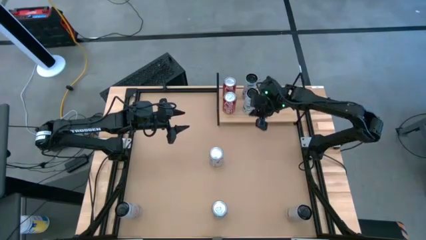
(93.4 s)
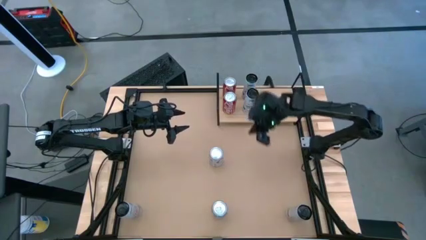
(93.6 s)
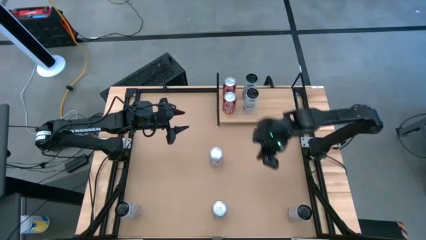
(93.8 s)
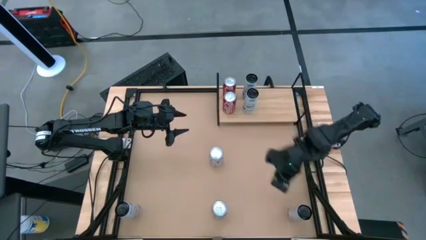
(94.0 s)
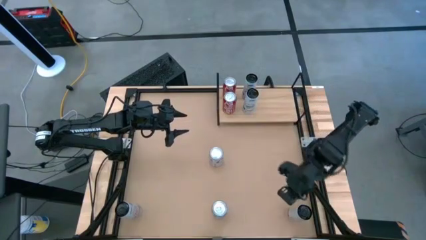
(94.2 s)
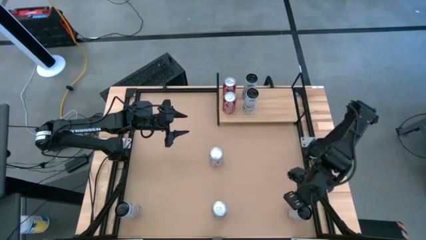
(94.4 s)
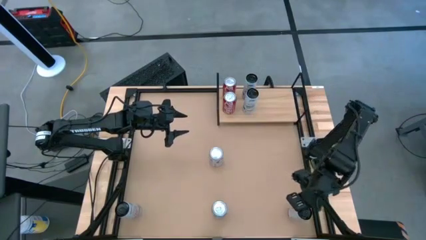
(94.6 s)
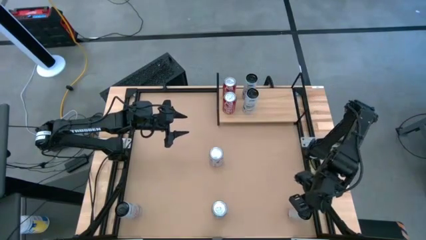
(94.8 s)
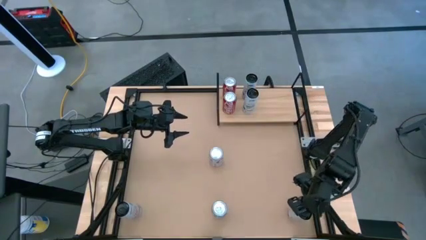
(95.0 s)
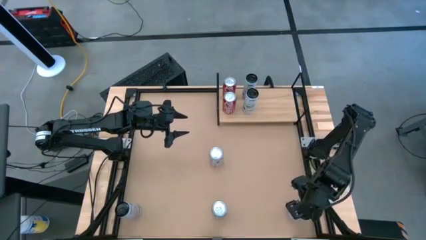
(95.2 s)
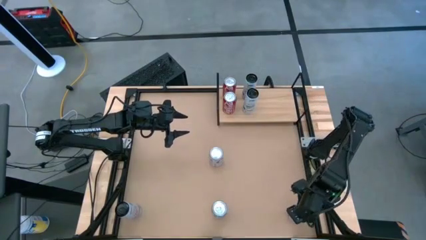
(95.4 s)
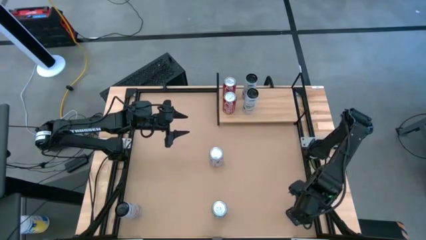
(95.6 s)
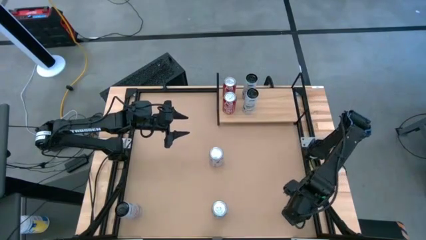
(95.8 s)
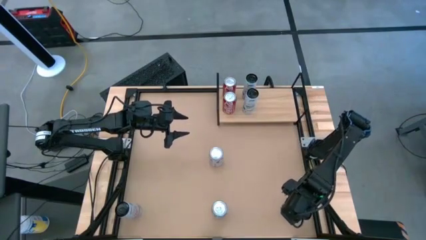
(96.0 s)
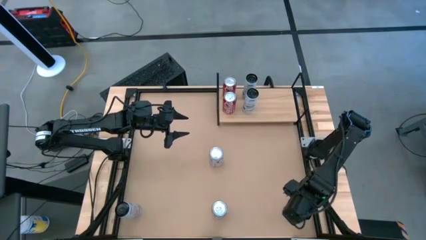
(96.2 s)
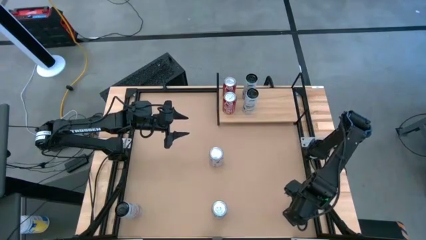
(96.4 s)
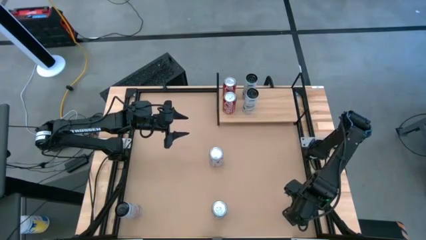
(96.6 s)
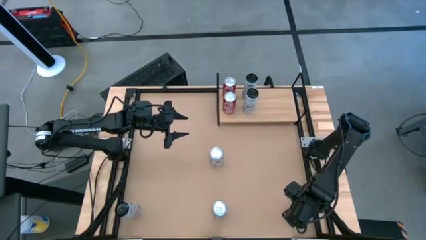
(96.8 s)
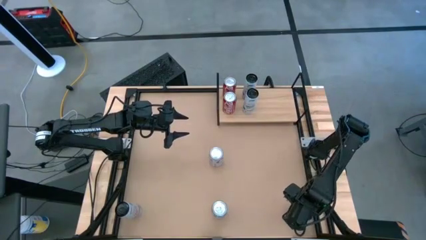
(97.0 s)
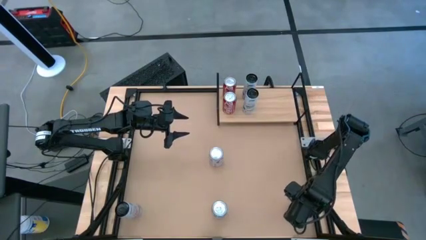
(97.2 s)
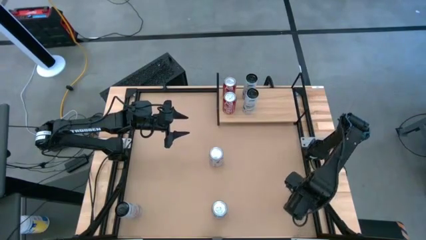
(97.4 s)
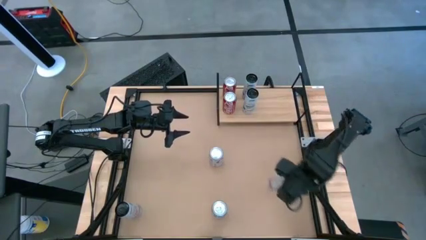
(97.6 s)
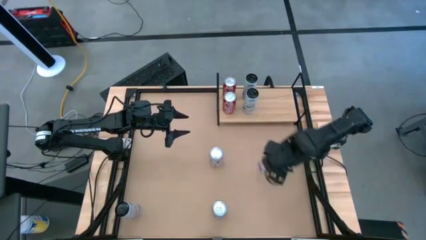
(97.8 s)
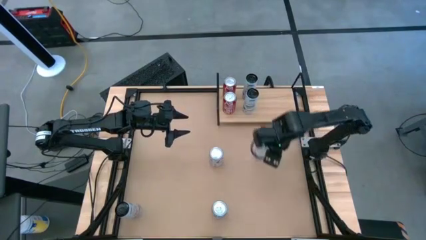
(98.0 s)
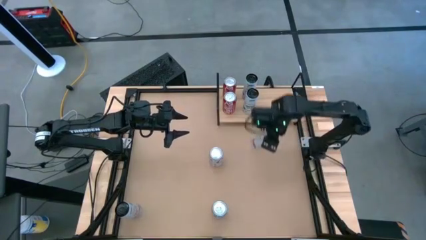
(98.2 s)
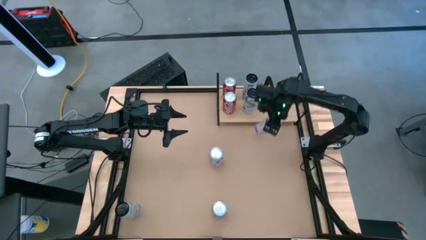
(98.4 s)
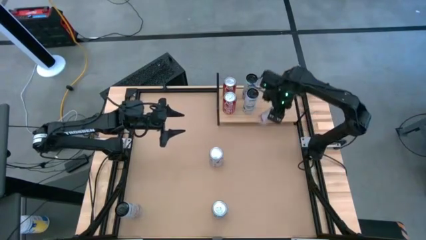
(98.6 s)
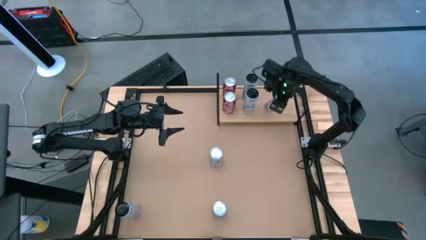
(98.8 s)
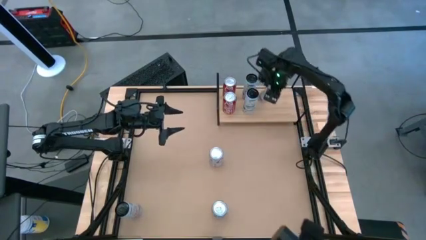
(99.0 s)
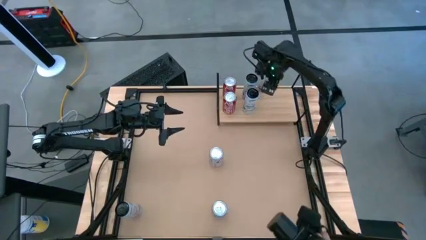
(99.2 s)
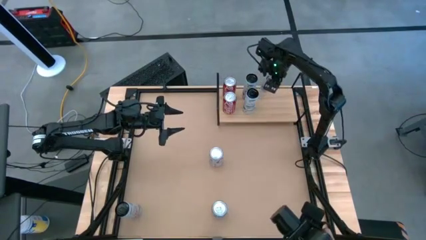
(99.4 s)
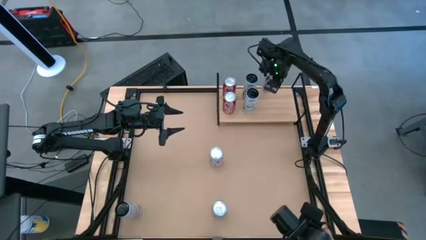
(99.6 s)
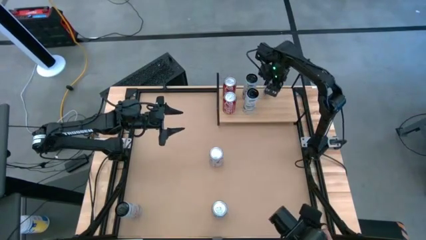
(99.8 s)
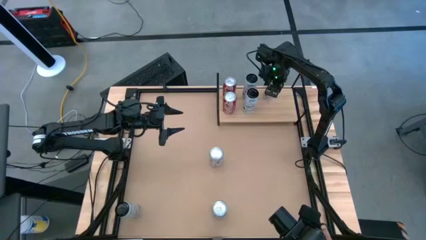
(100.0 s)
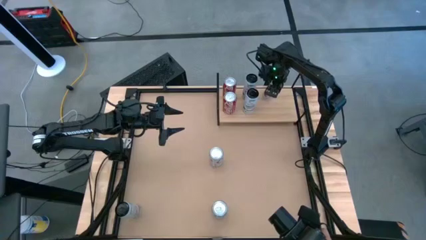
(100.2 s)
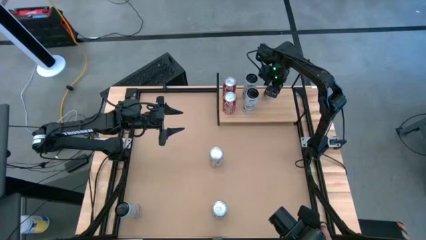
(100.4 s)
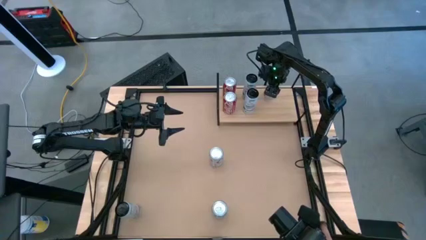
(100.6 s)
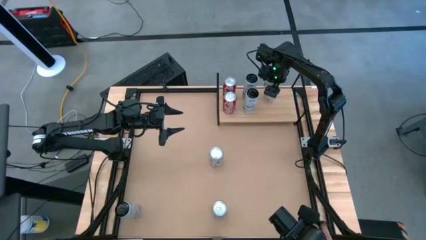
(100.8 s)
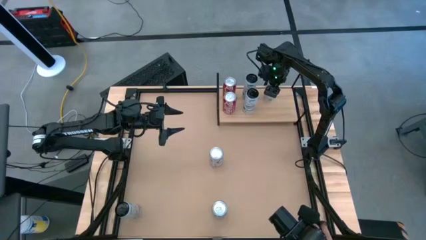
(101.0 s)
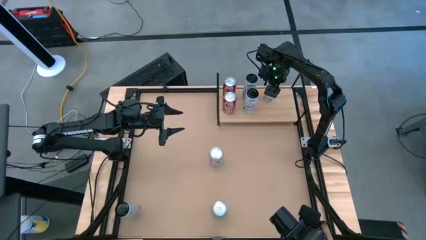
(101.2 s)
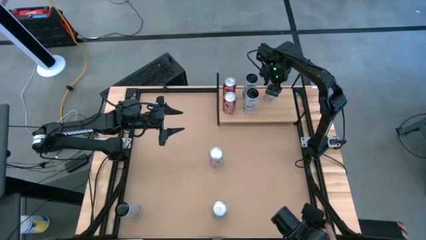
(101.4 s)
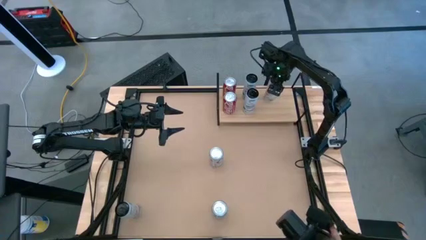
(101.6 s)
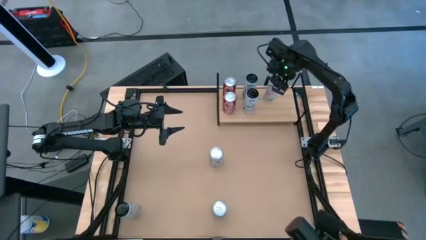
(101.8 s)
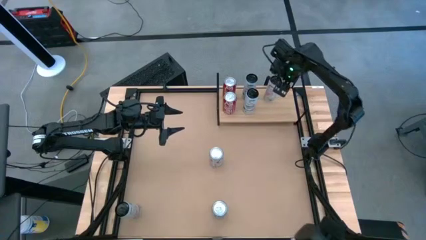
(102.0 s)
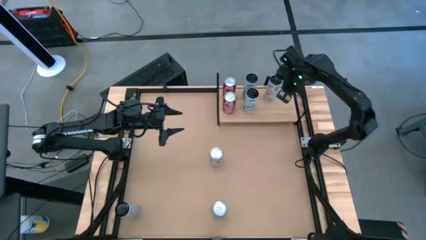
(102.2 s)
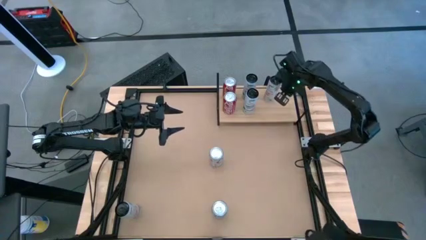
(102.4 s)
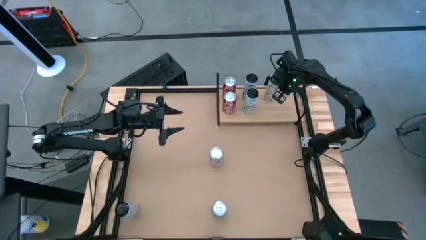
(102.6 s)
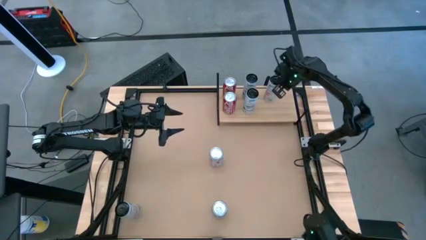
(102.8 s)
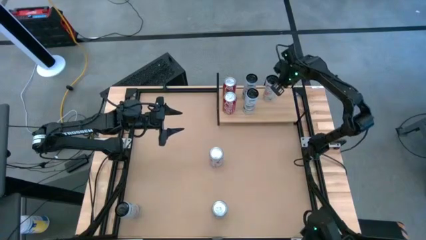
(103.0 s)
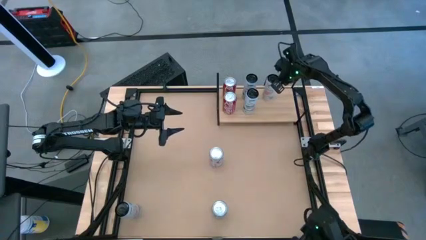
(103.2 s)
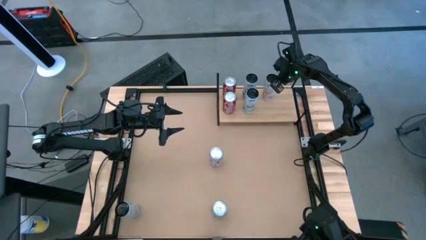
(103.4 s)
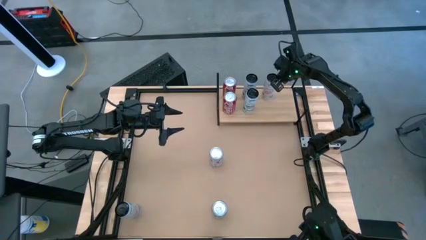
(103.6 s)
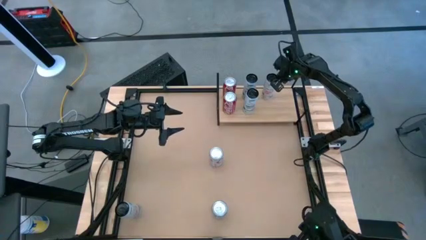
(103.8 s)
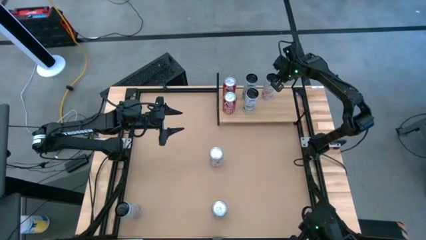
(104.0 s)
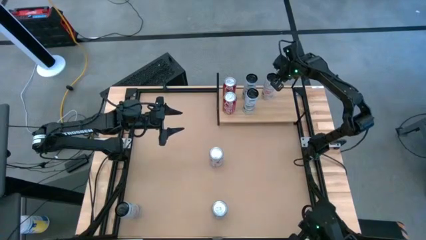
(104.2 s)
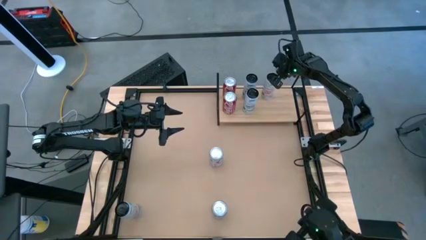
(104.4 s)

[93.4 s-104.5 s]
Task: Place canned beverage on shelf
Put the right pink soda can on the shelf

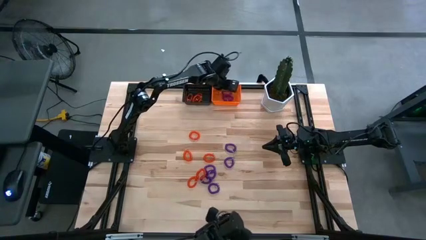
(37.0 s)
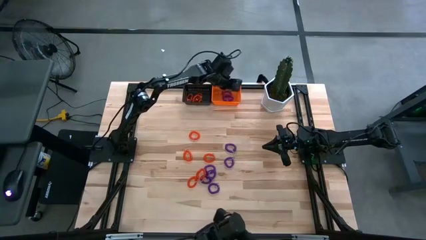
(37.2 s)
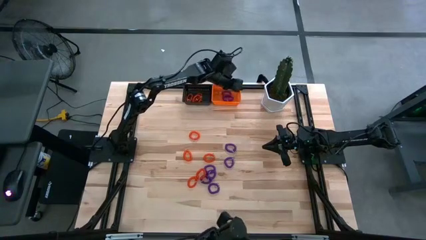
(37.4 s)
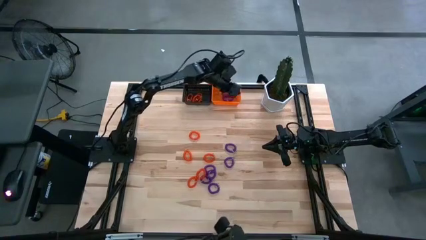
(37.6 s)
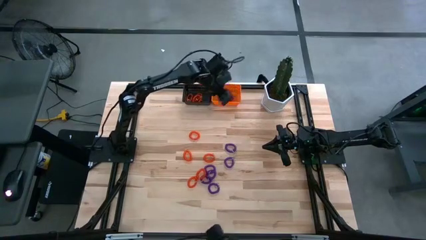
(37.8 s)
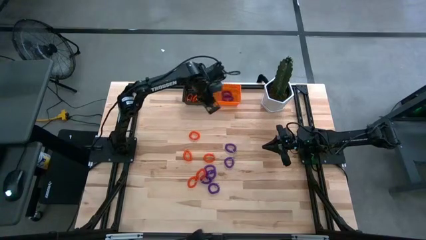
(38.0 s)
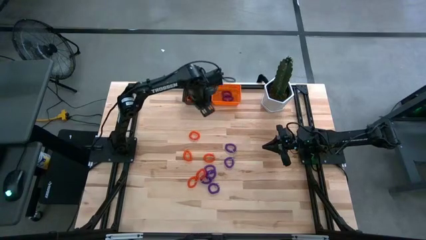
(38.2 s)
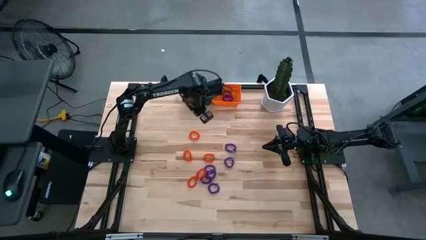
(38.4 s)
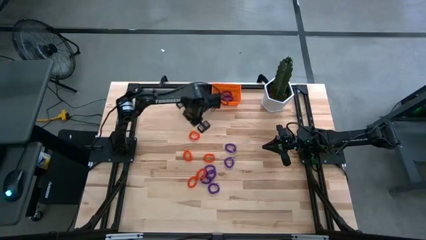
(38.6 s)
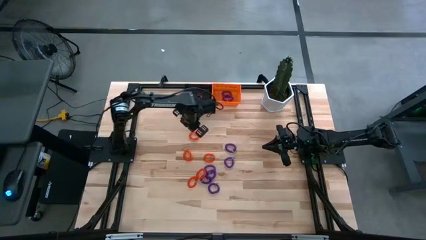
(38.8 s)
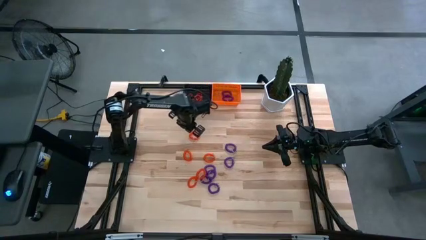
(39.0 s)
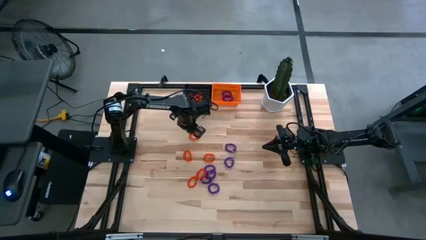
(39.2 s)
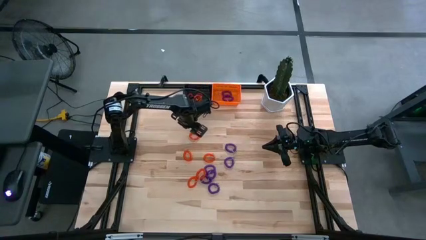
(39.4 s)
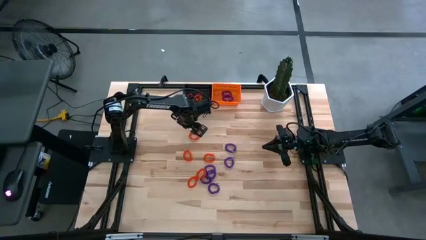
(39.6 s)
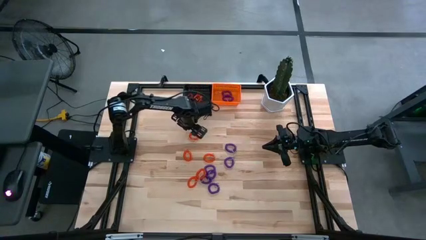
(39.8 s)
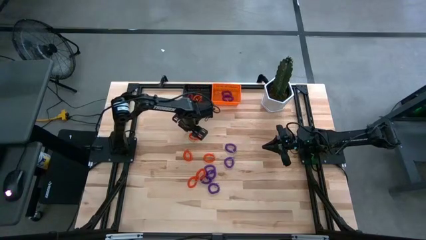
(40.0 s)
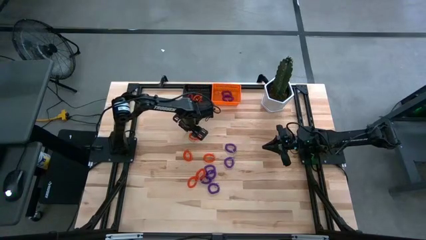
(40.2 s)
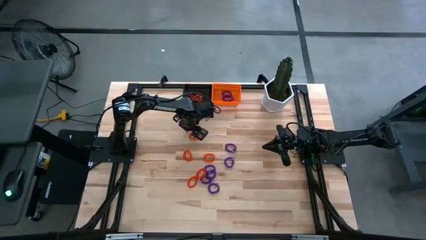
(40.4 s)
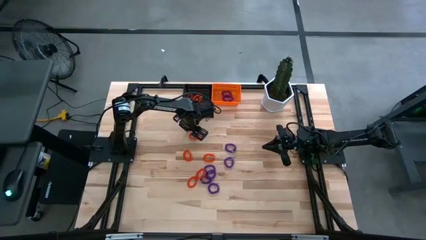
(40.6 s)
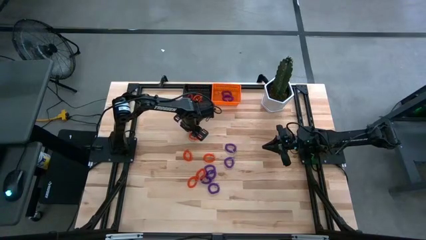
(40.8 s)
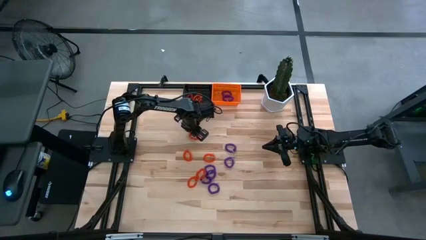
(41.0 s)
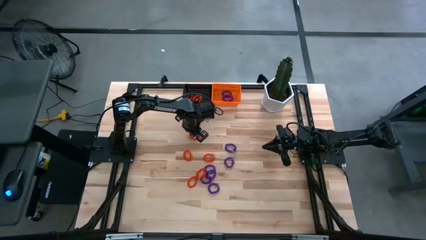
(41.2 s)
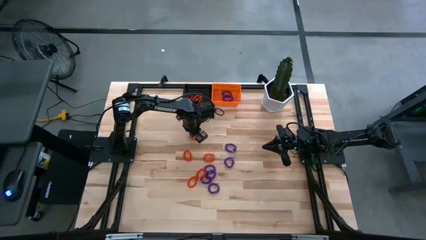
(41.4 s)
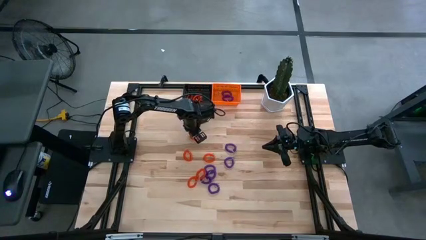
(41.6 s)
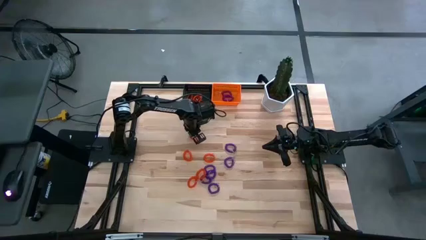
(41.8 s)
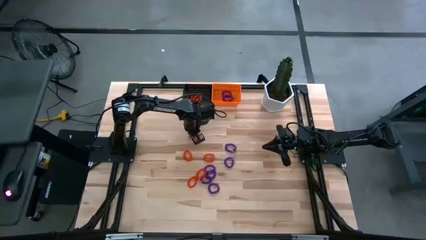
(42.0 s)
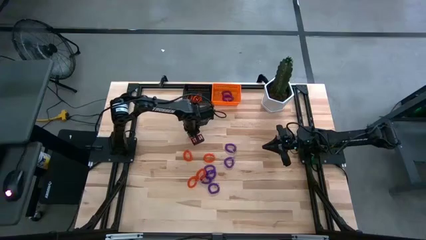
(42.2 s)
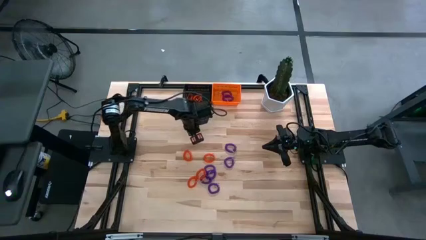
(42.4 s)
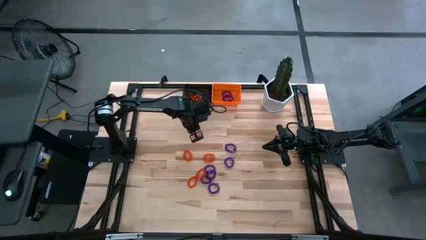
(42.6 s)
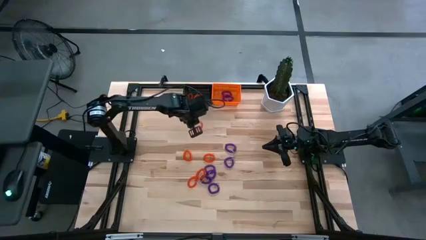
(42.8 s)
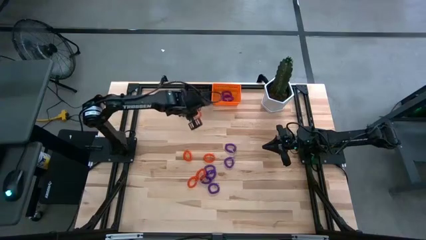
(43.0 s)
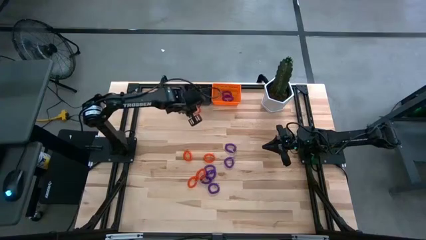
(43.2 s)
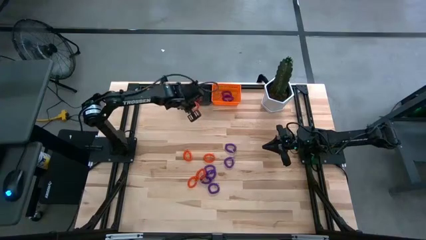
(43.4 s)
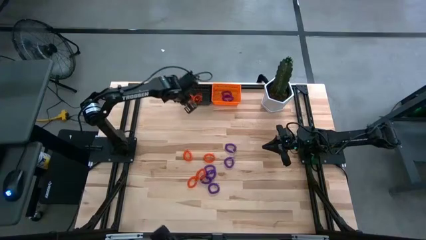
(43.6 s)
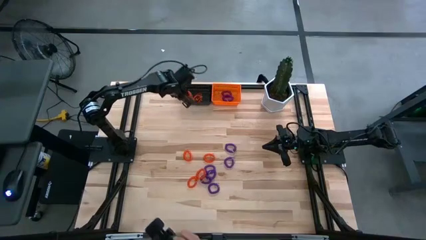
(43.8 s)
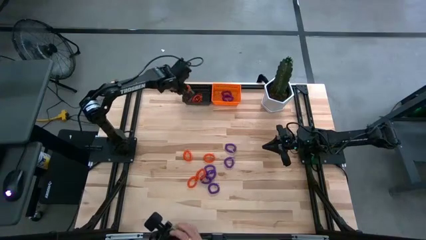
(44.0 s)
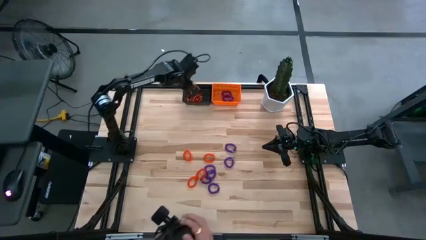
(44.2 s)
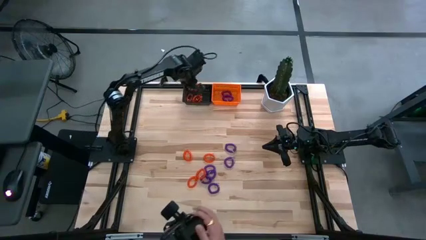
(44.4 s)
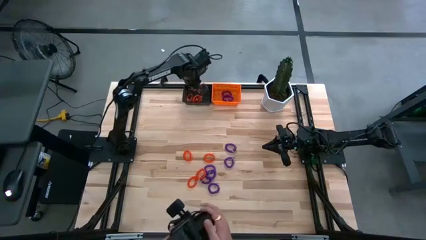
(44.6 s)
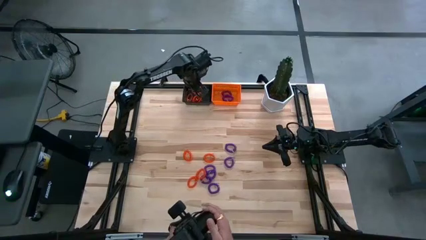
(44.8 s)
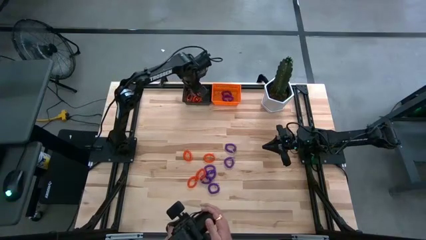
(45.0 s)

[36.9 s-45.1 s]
Task: Sort spring keychains into baskets
Put the orange spring keychain into the black basket
